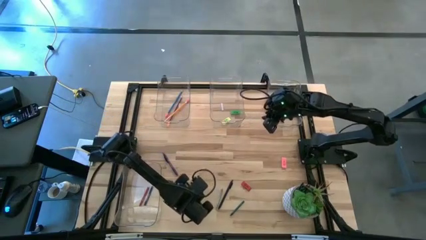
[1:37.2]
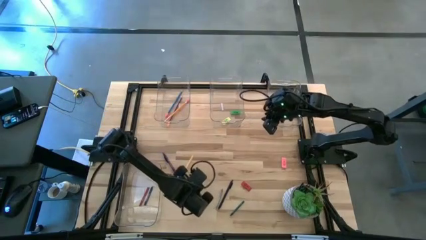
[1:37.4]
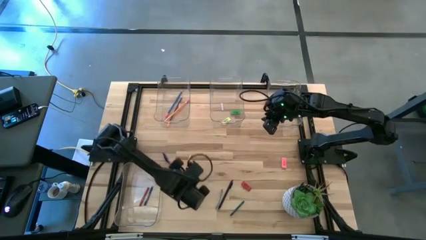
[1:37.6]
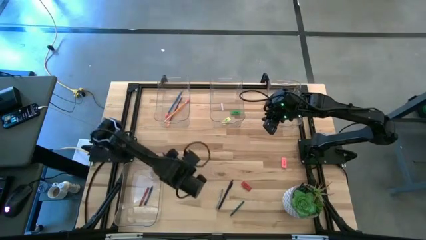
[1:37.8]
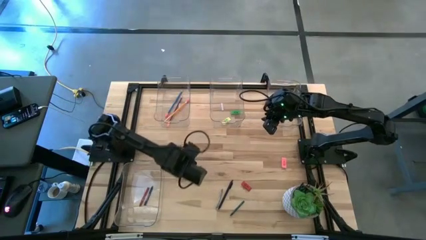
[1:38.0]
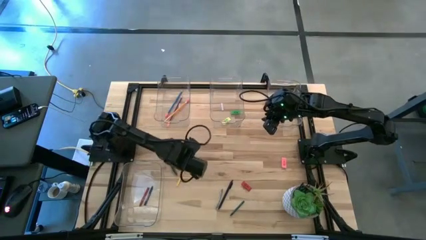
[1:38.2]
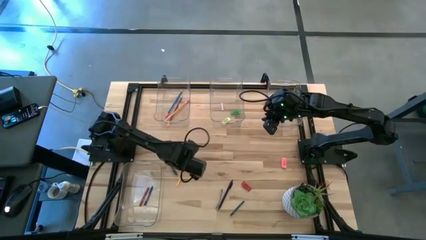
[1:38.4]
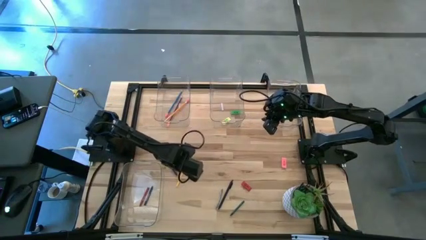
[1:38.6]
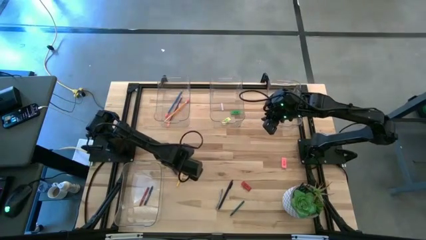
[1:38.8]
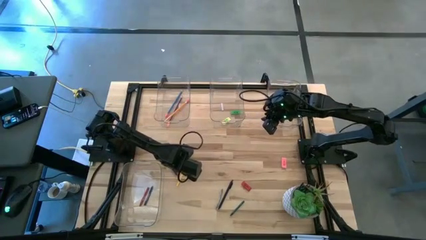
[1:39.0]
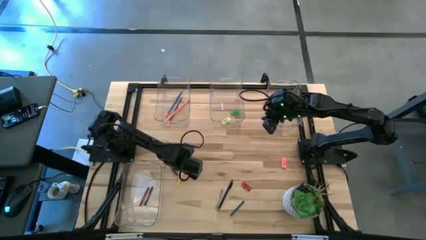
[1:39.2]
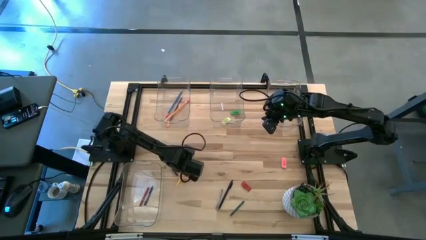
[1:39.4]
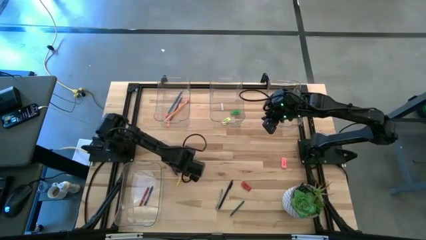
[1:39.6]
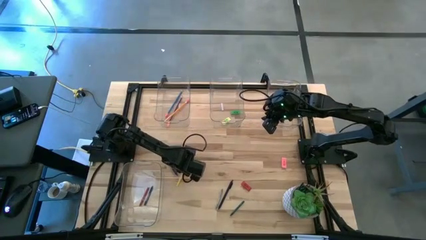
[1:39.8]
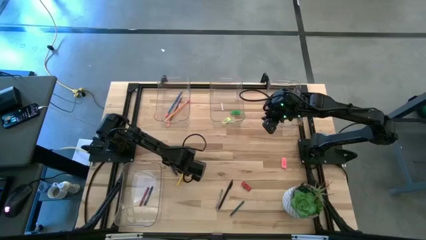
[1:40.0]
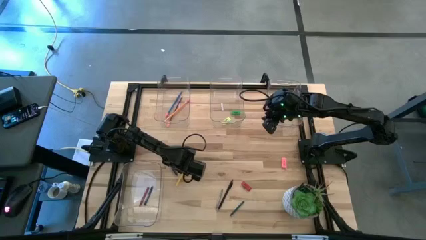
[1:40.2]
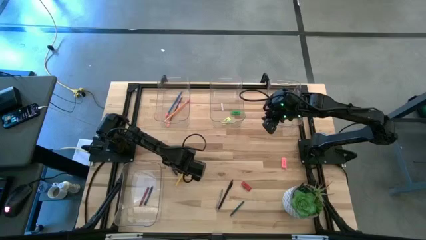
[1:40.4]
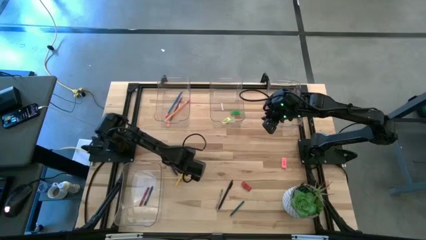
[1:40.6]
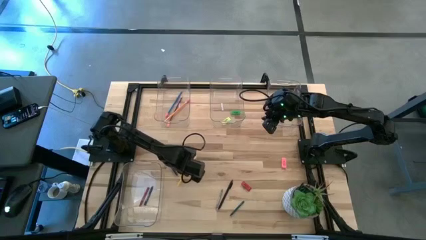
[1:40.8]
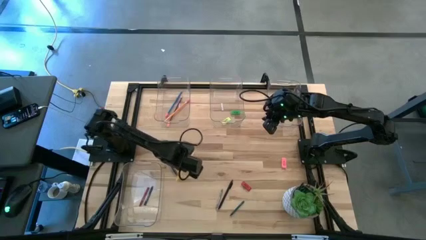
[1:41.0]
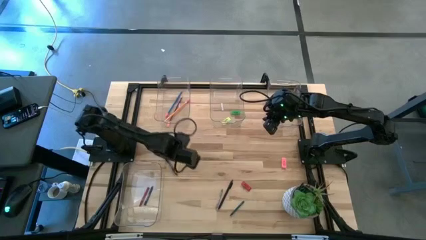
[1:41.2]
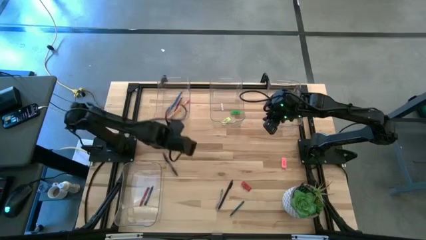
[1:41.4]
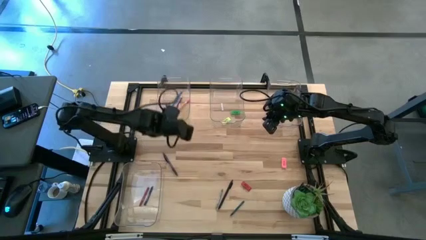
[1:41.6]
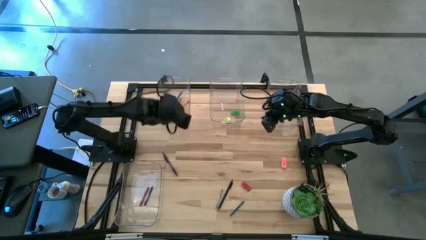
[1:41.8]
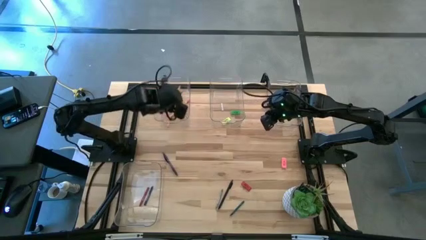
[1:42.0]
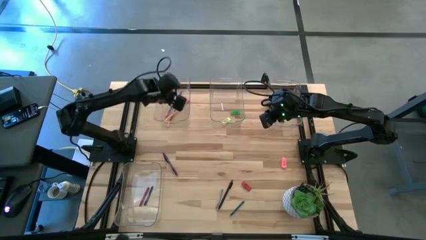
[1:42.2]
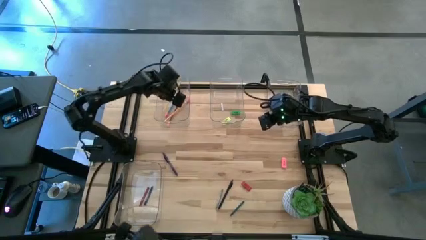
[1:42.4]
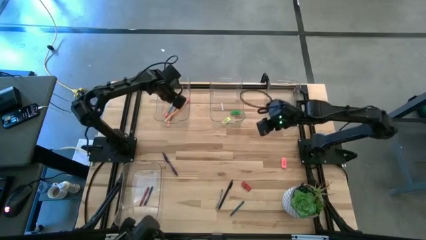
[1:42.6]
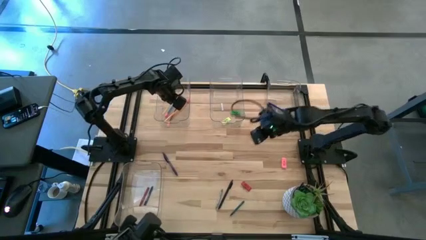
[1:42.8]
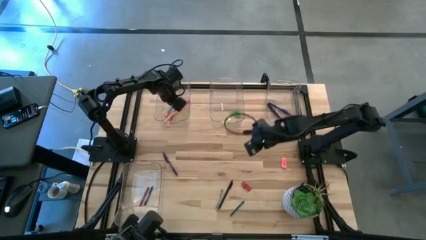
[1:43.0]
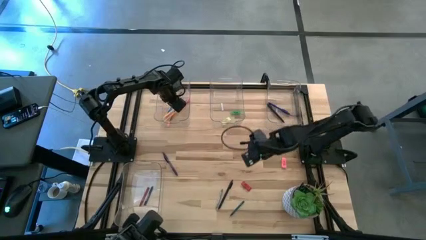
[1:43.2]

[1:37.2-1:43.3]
Task: Sort crayons/erasers/pens/pencils in bins
Put the yellow pencil into the top left transparent bin

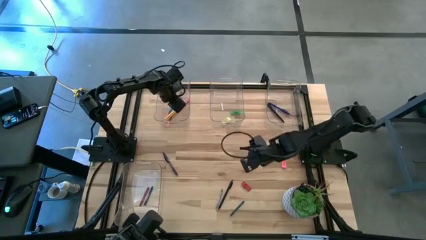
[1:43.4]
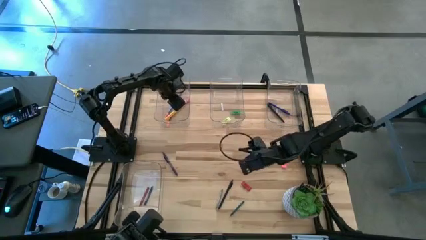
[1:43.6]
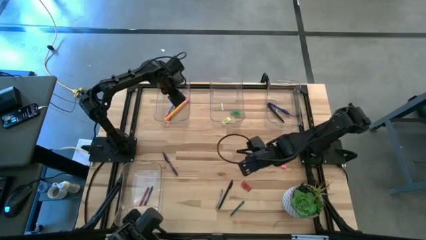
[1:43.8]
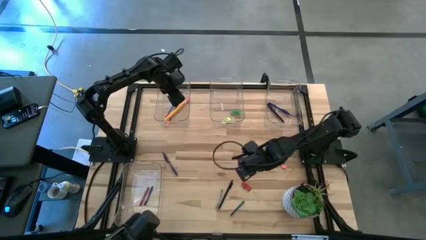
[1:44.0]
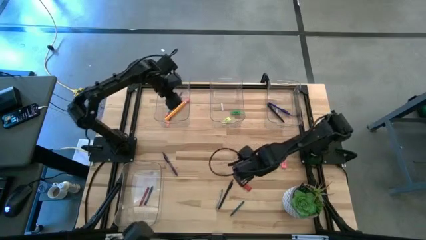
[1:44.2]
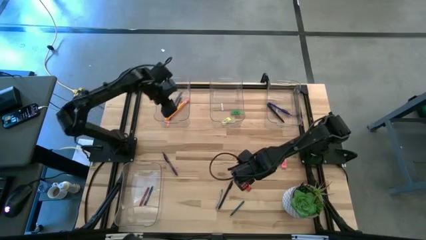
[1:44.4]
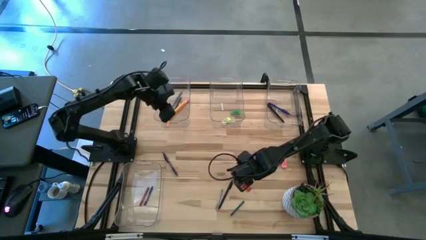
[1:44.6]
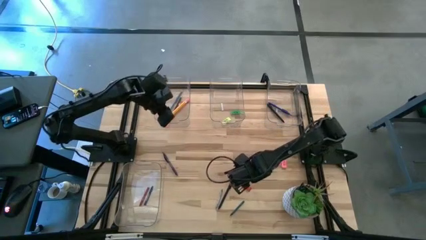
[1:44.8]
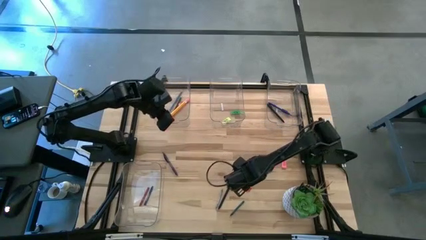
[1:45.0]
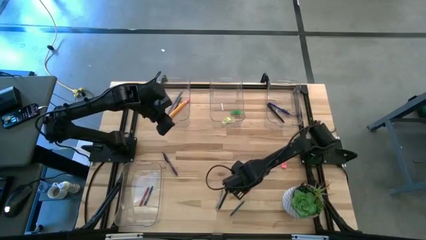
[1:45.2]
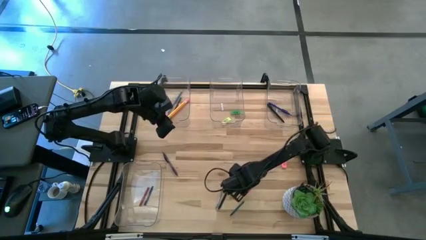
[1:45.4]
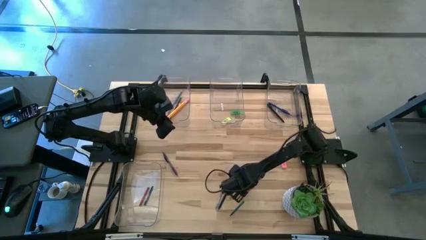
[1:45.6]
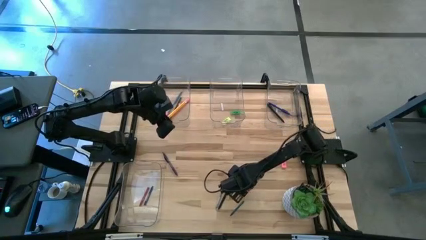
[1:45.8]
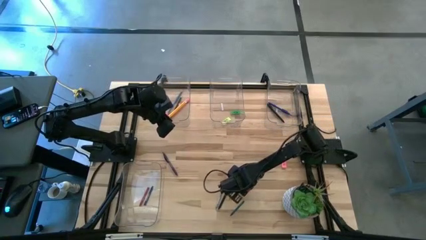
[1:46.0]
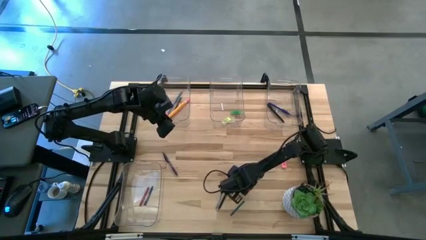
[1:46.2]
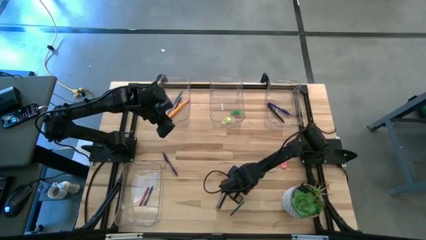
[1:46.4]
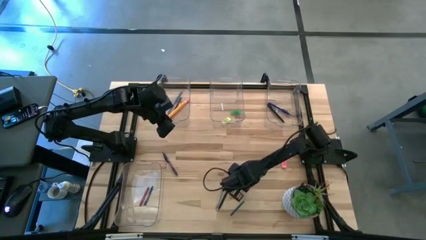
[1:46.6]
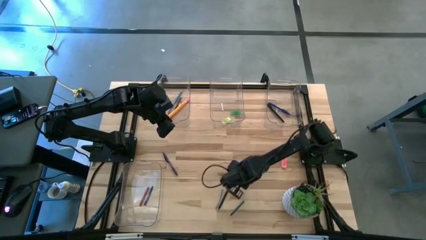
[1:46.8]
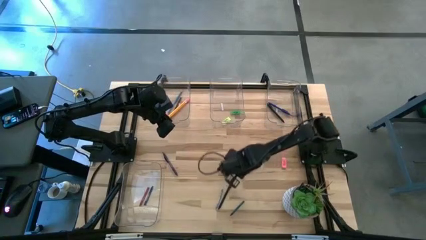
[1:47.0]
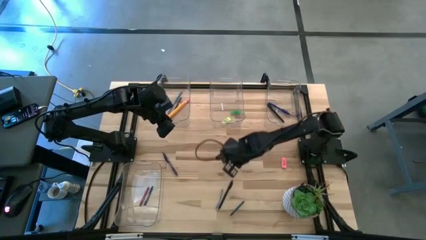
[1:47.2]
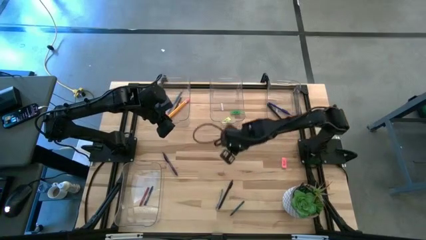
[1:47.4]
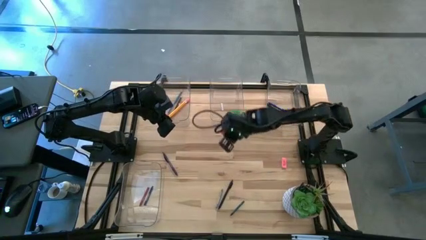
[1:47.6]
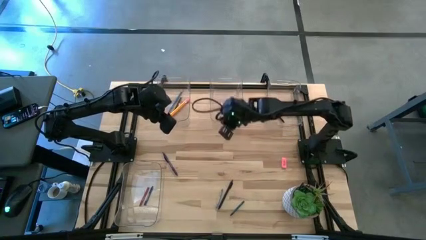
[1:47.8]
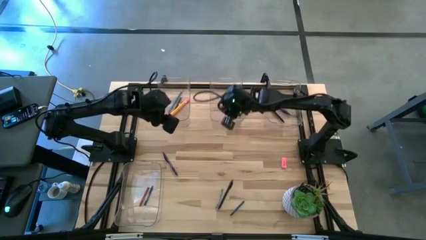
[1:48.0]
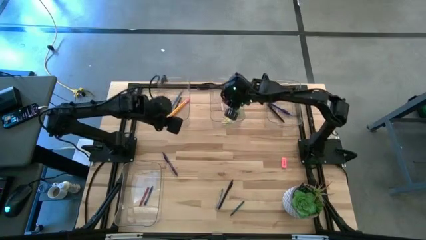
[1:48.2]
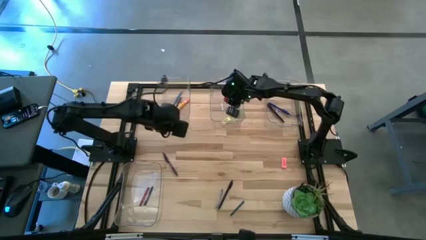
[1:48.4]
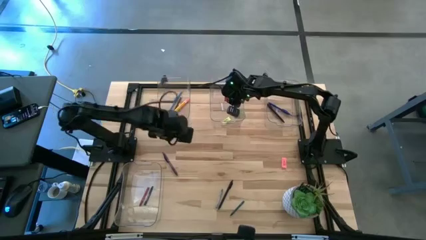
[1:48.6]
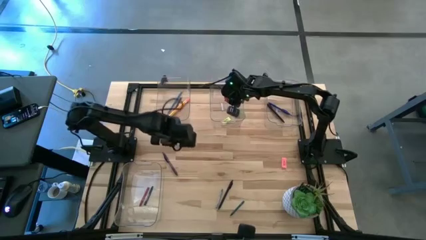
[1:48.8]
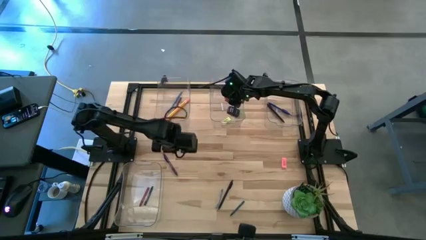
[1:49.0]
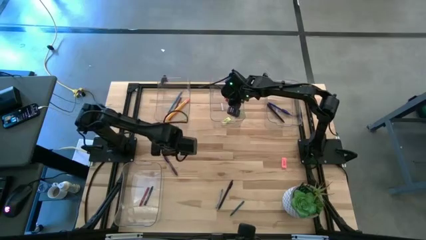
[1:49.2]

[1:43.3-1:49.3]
Put the red eraser into the top middle transparent bin

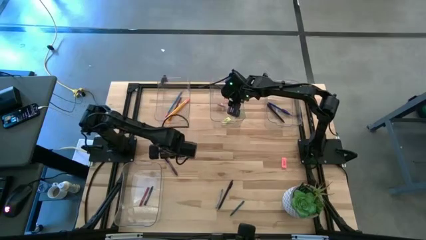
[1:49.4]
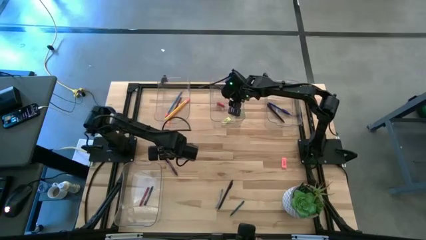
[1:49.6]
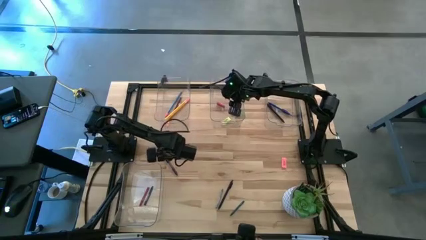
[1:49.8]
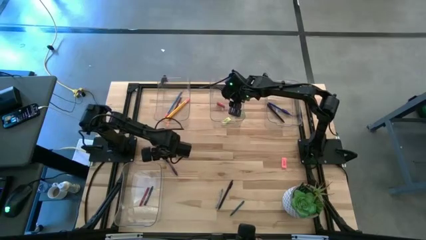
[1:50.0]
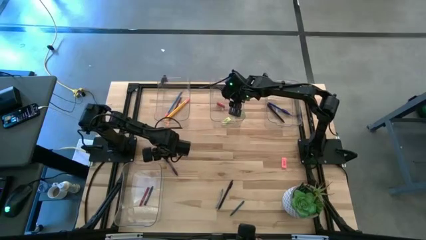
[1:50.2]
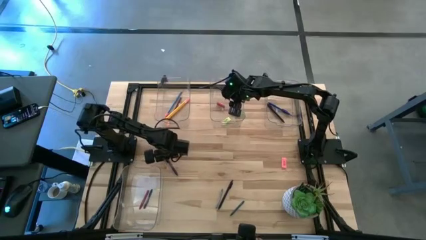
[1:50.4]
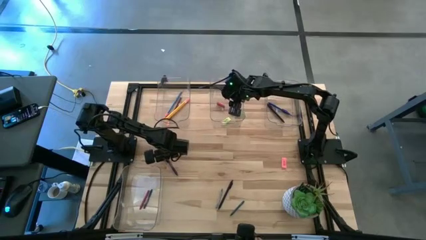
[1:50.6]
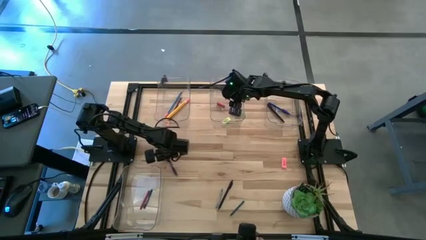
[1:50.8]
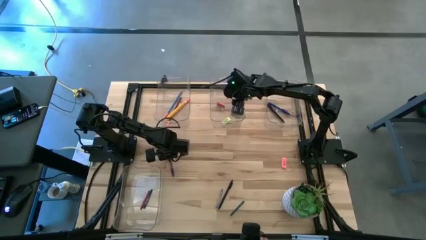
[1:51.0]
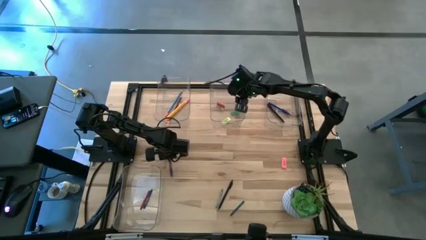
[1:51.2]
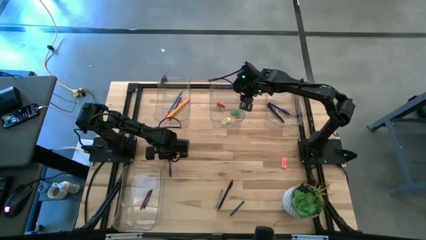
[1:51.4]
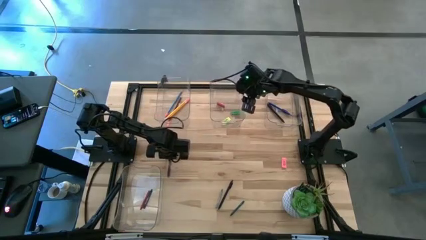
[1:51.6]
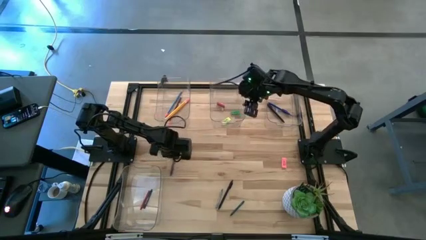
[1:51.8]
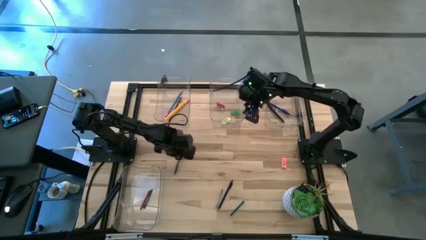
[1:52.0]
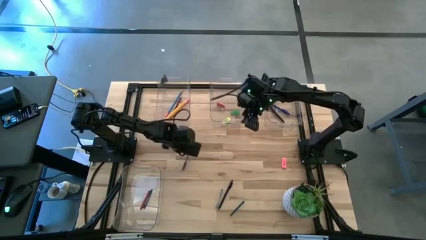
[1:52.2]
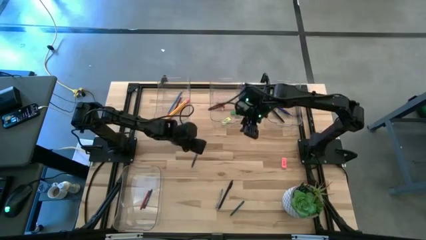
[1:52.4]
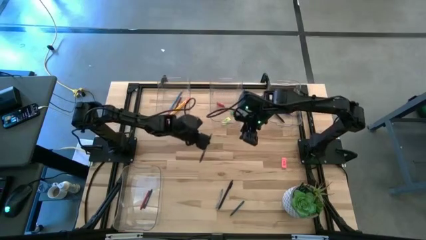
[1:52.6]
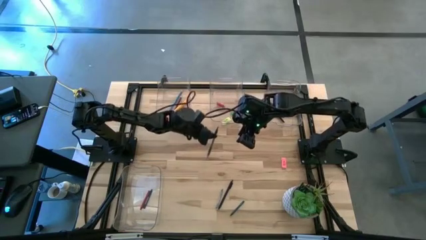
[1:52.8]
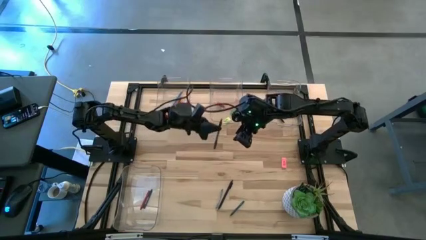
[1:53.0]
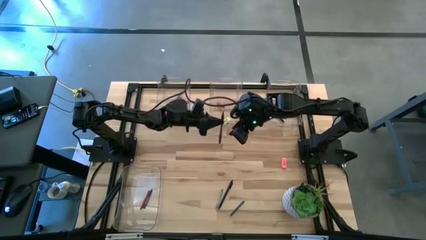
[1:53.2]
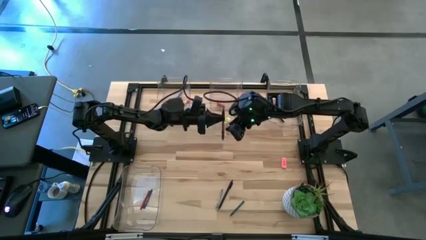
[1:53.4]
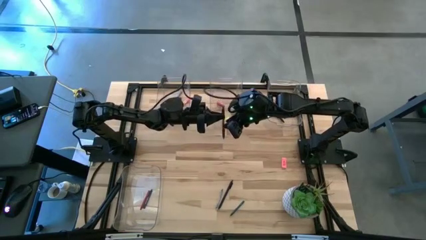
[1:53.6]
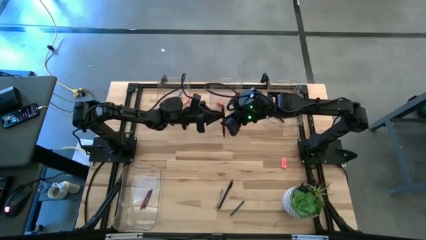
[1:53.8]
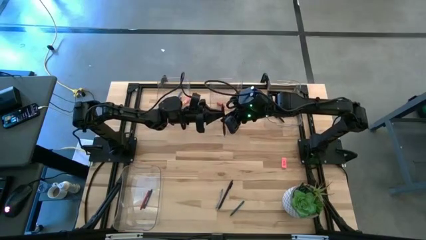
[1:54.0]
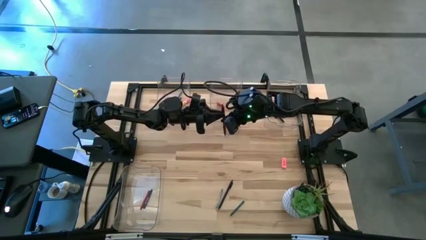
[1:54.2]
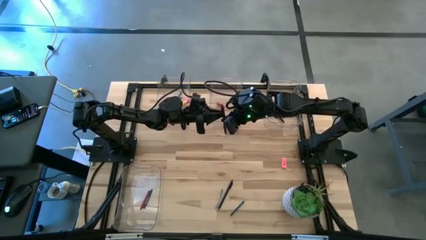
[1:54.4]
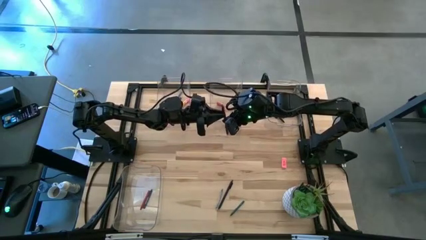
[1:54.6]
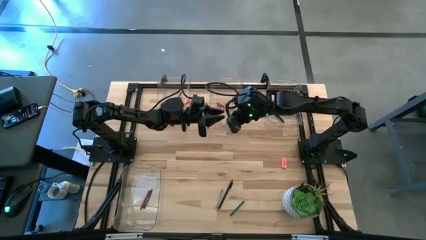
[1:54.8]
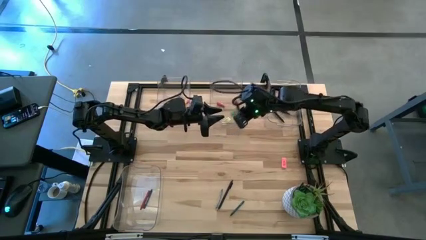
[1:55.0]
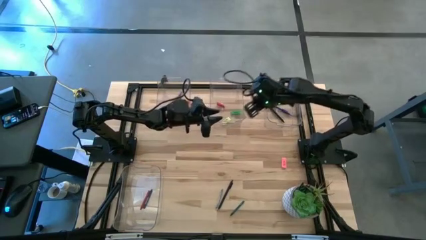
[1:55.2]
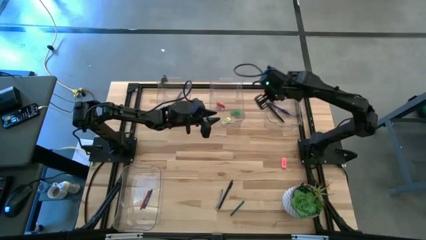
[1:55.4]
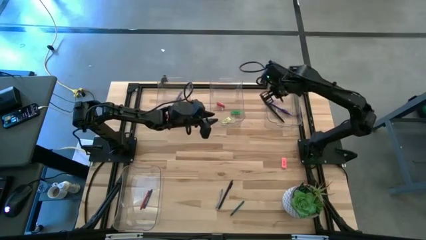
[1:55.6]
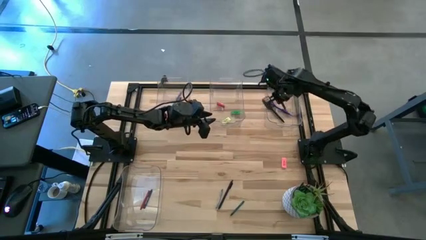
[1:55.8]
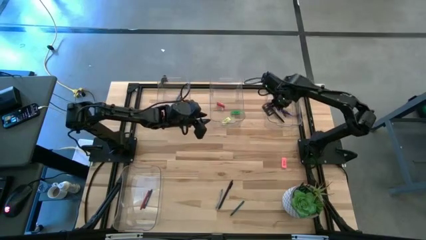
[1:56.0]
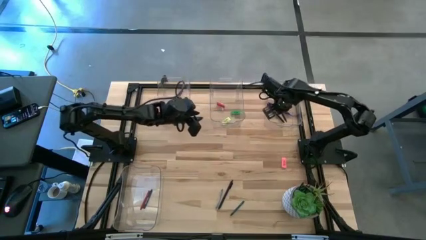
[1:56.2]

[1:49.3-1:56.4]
Put the purple pen into the top right transparent bin
